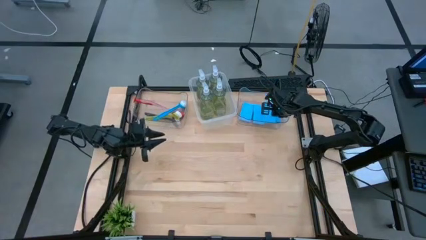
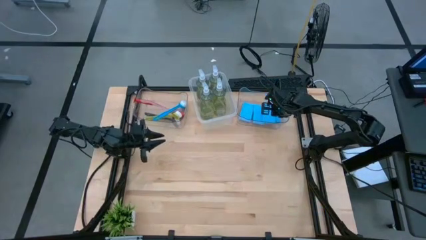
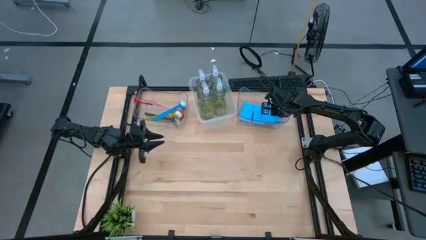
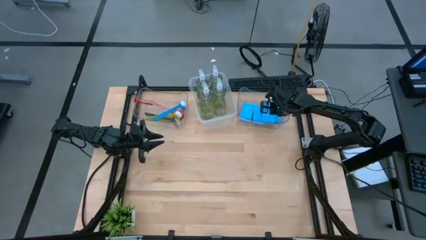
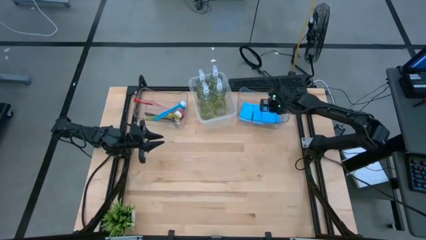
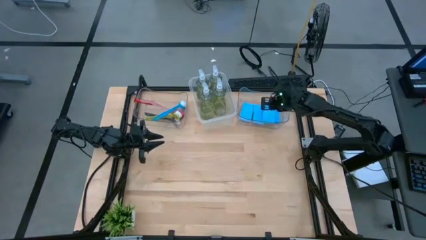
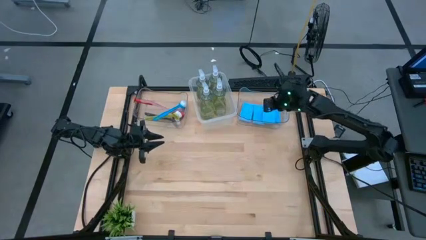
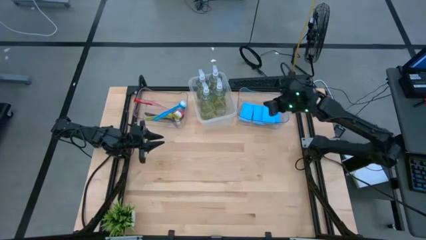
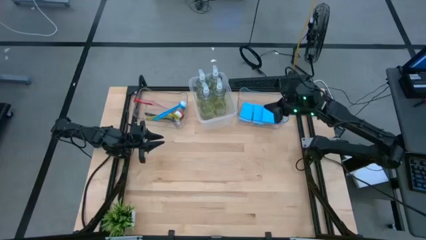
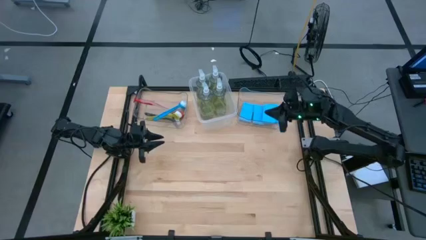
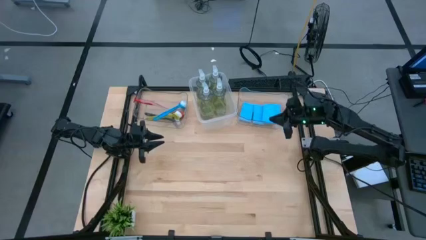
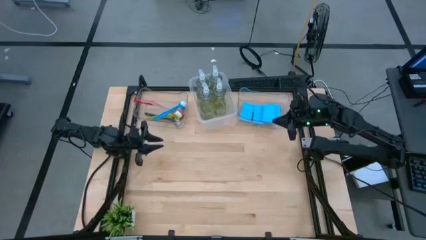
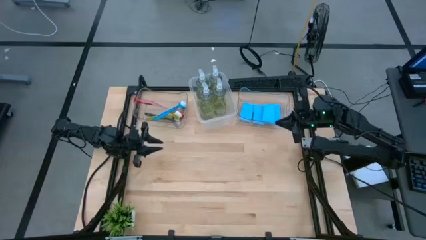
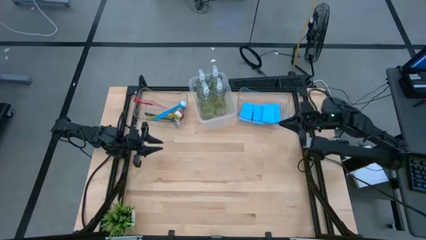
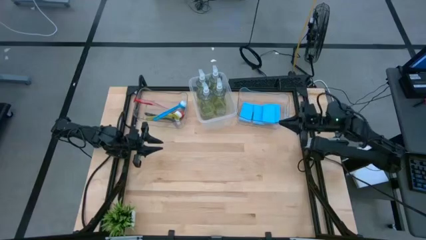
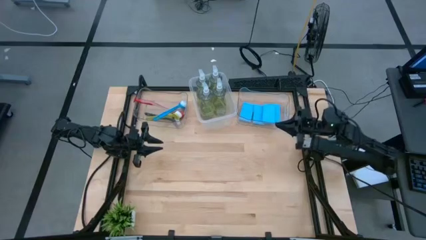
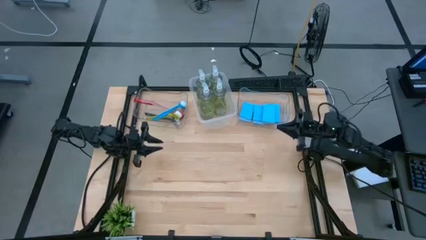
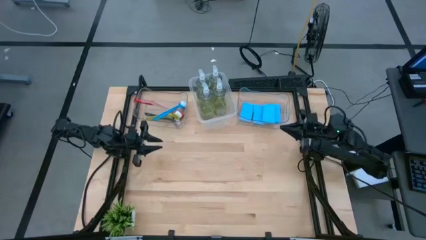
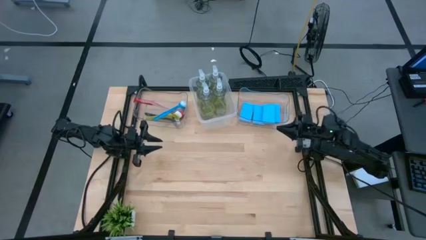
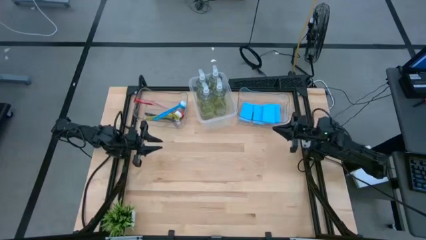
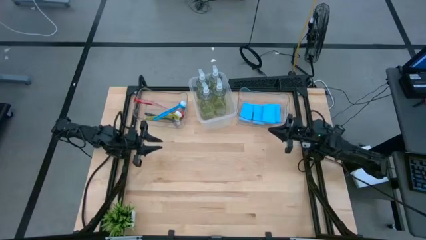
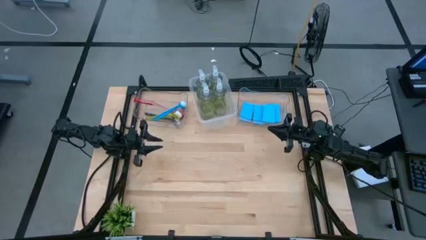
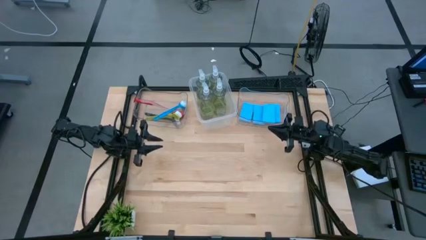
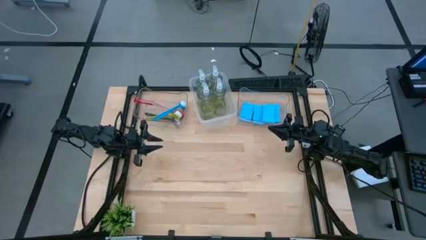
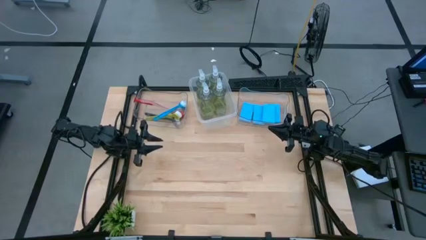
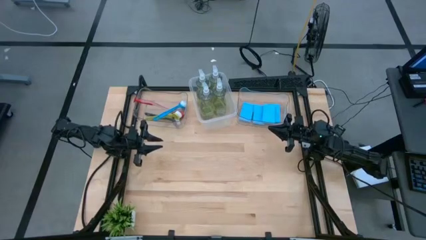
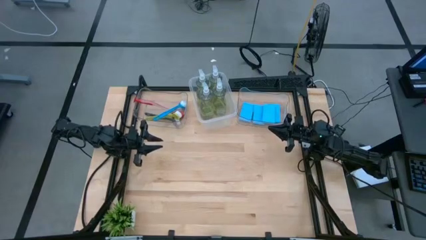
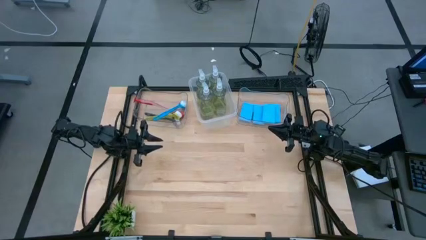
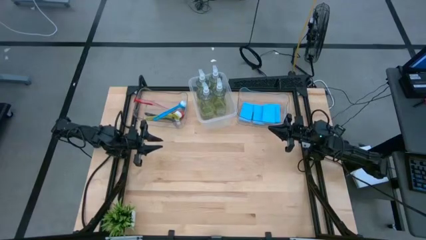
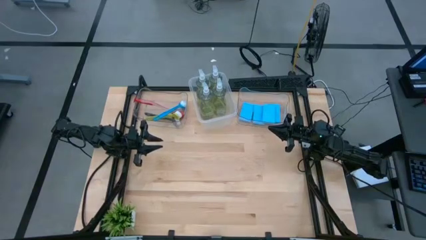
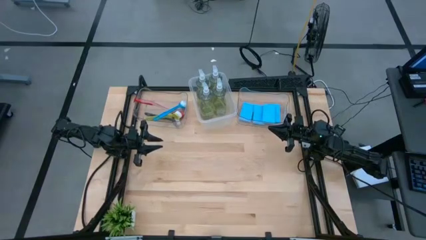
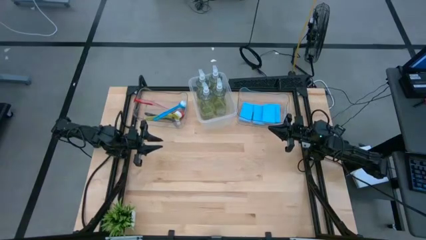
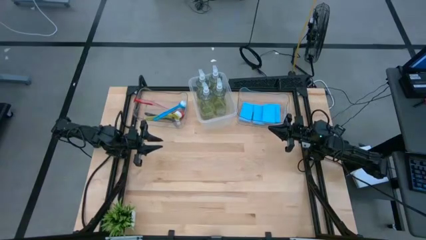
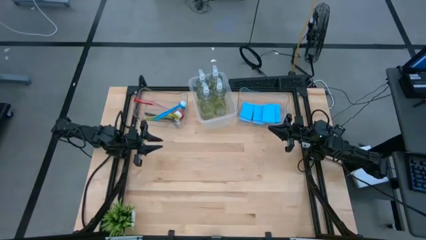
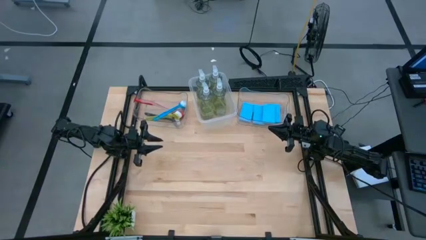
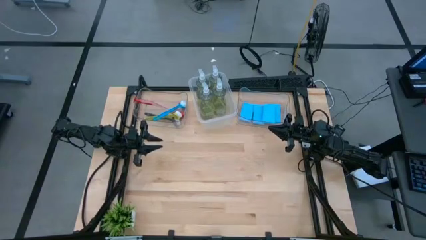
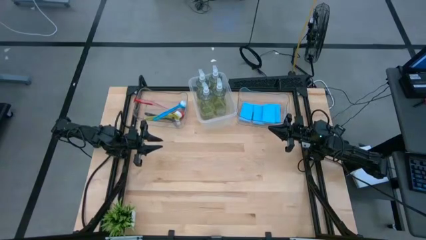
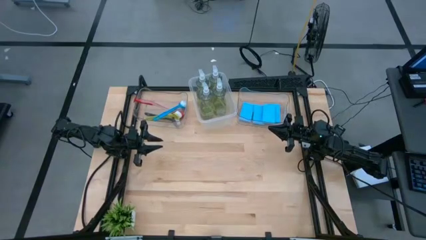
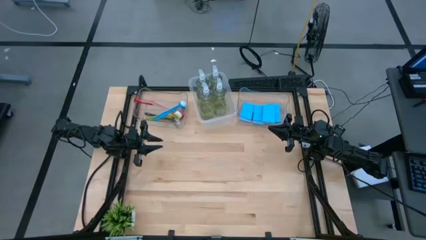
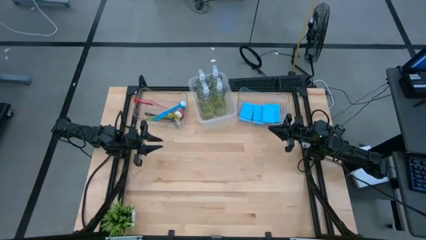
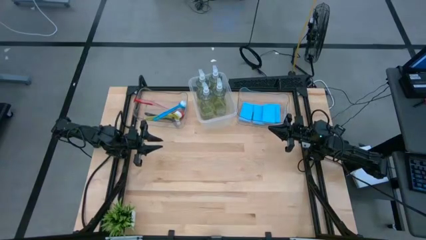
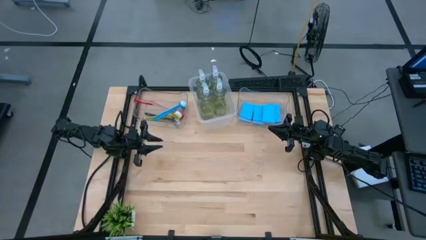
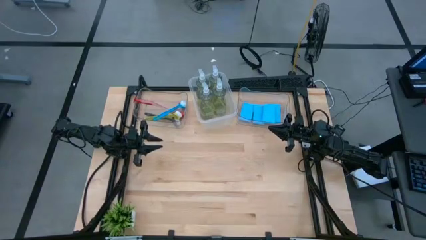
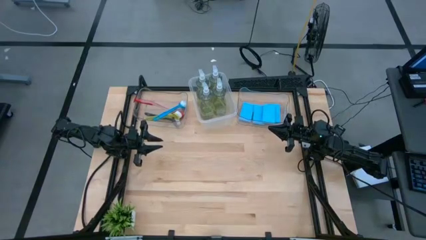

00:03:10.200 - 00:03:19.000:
Task: Pick & Place Kitchen Sink Supplies
Return to Home Position
